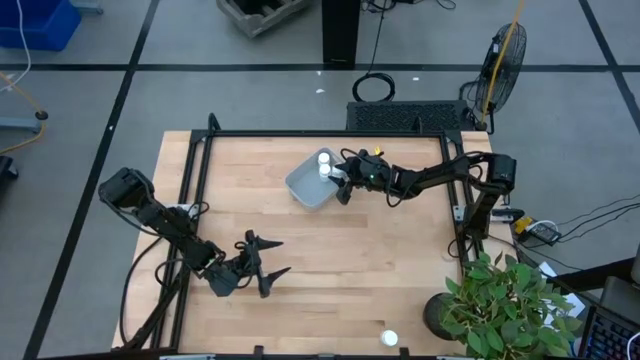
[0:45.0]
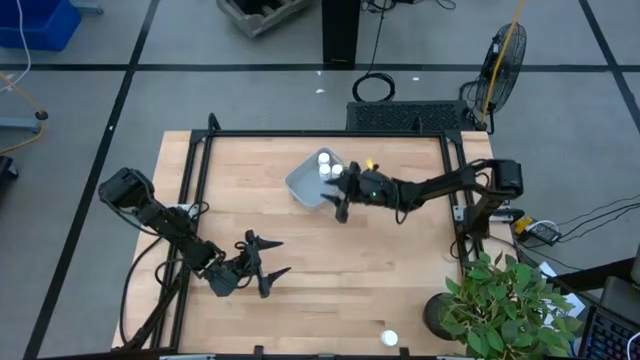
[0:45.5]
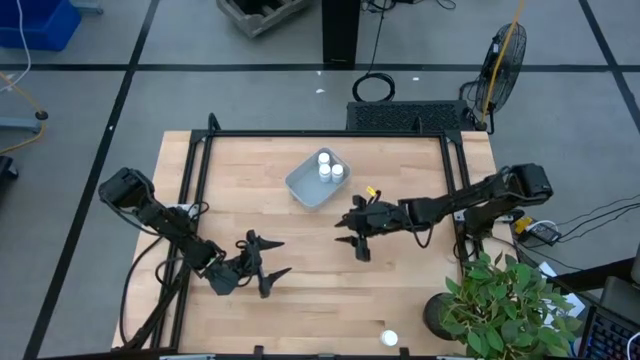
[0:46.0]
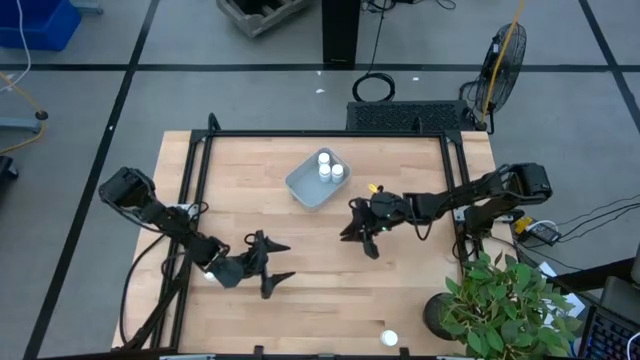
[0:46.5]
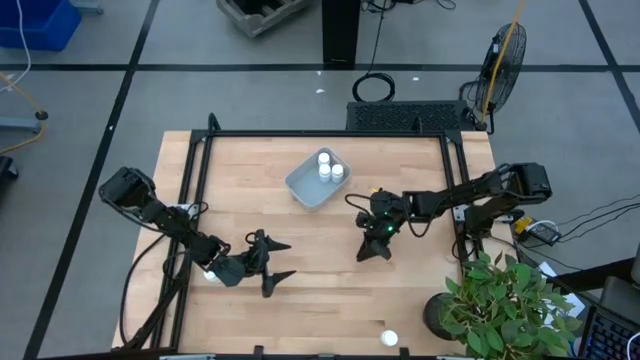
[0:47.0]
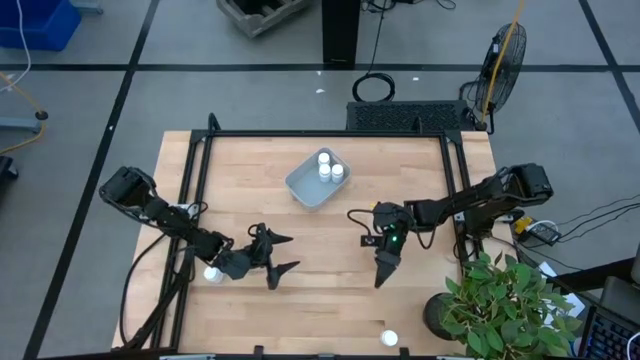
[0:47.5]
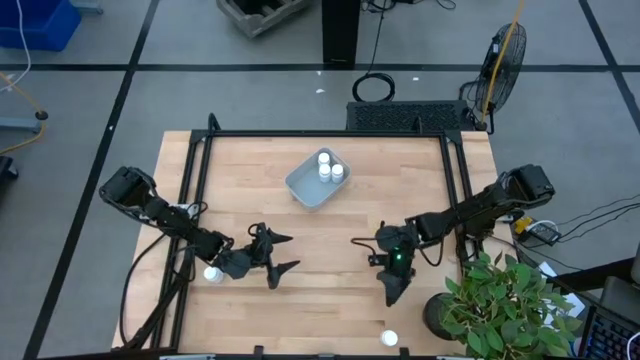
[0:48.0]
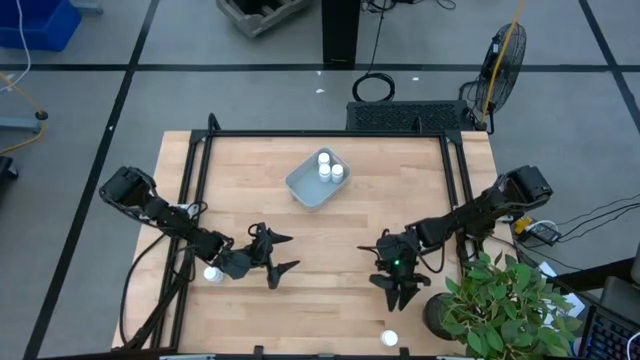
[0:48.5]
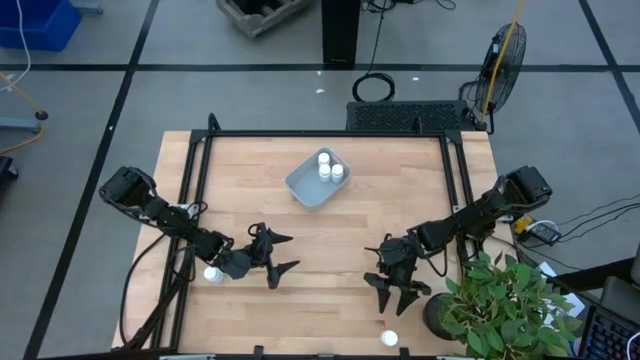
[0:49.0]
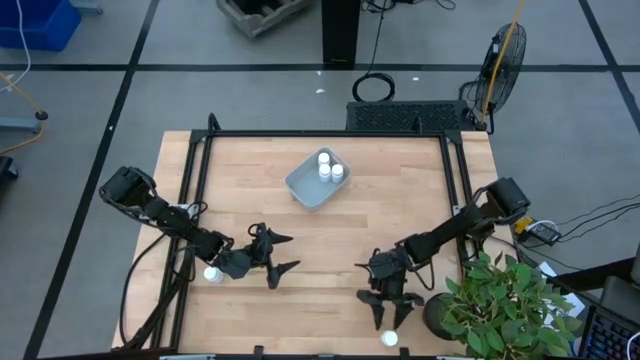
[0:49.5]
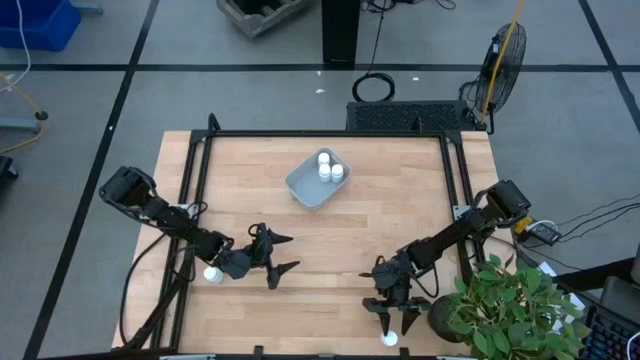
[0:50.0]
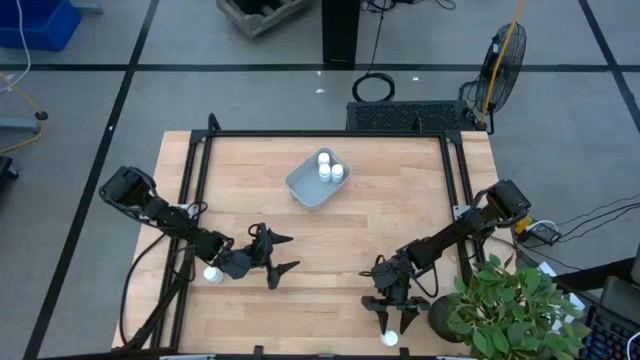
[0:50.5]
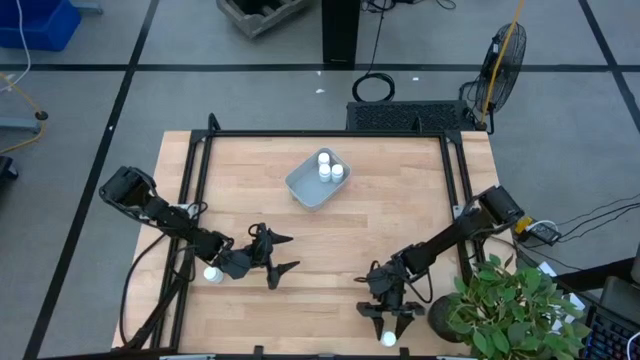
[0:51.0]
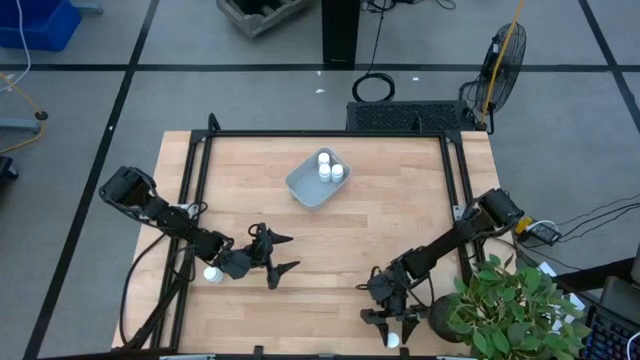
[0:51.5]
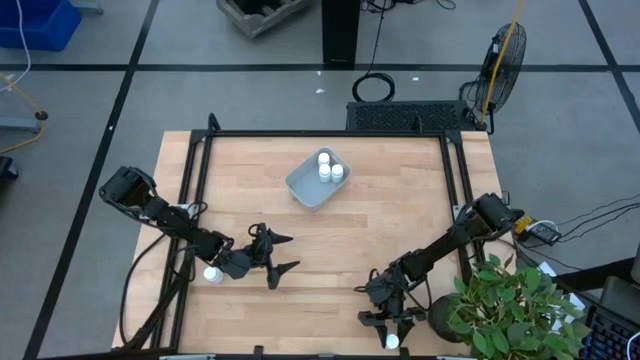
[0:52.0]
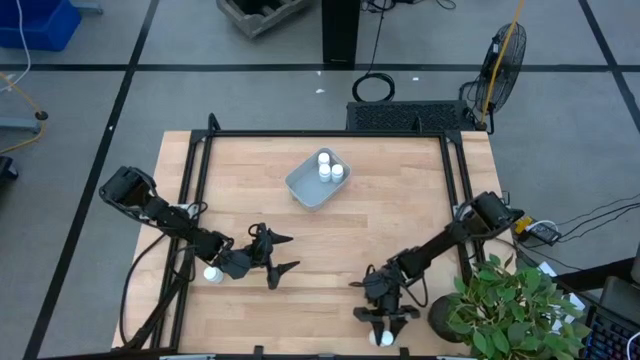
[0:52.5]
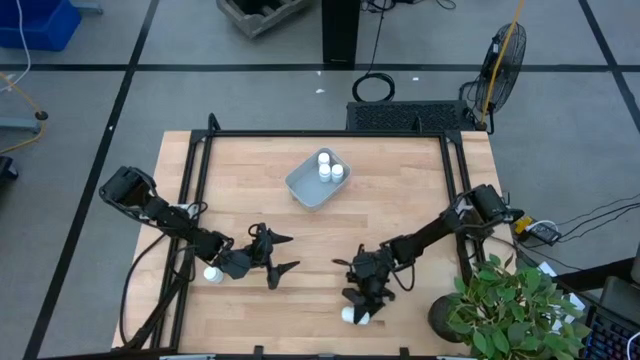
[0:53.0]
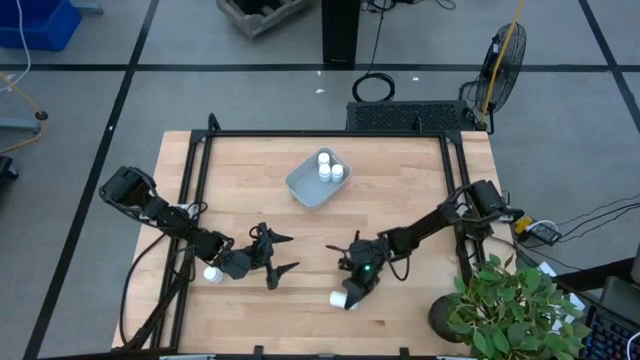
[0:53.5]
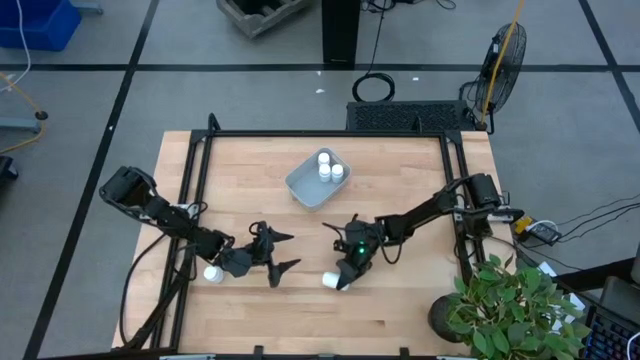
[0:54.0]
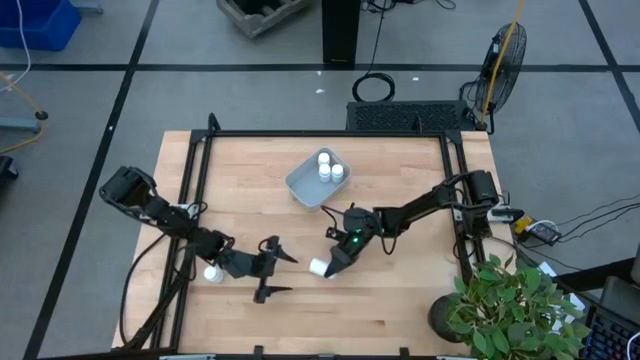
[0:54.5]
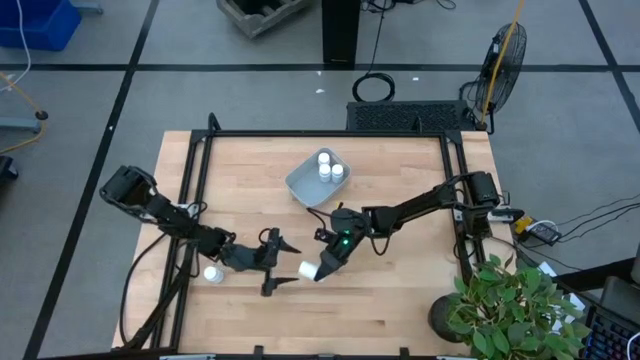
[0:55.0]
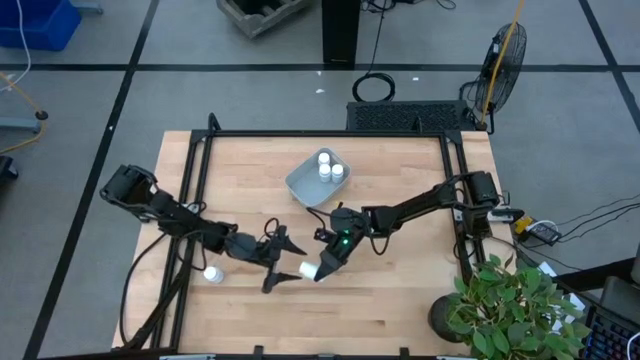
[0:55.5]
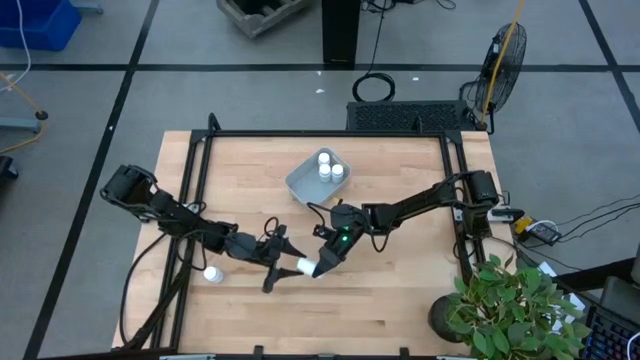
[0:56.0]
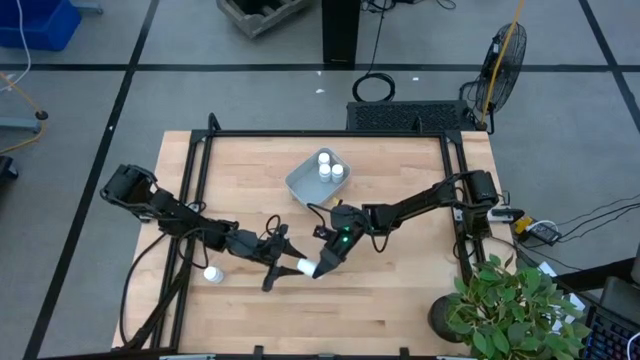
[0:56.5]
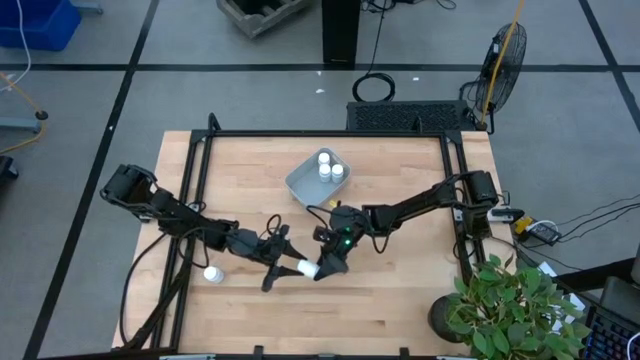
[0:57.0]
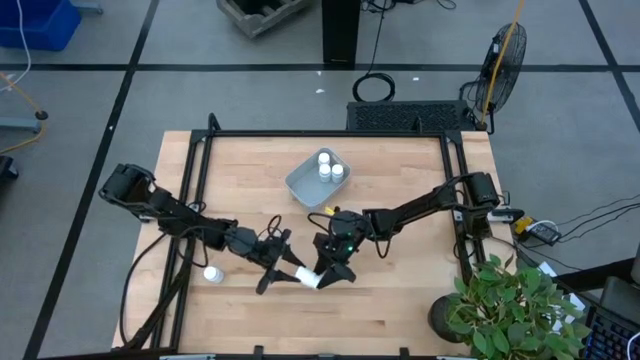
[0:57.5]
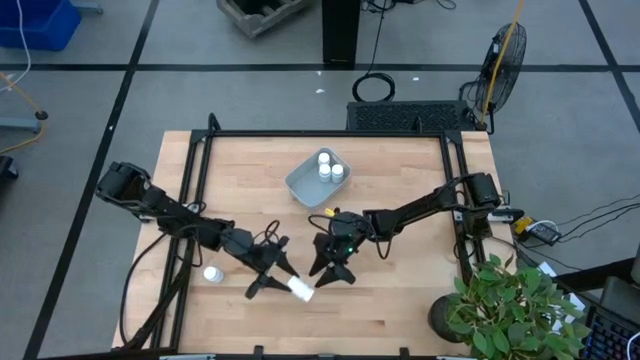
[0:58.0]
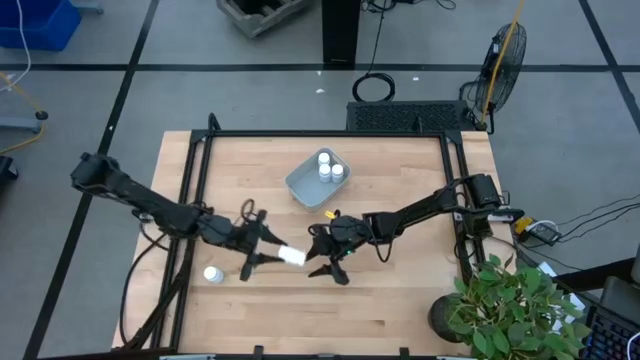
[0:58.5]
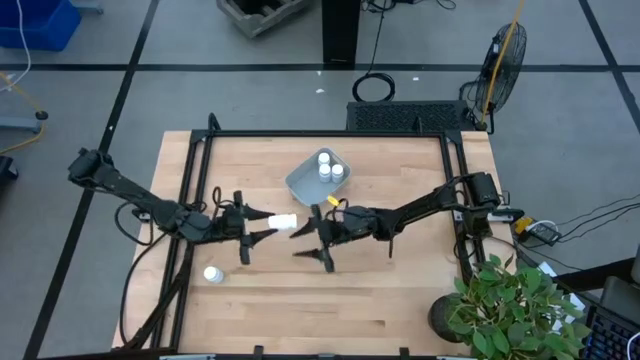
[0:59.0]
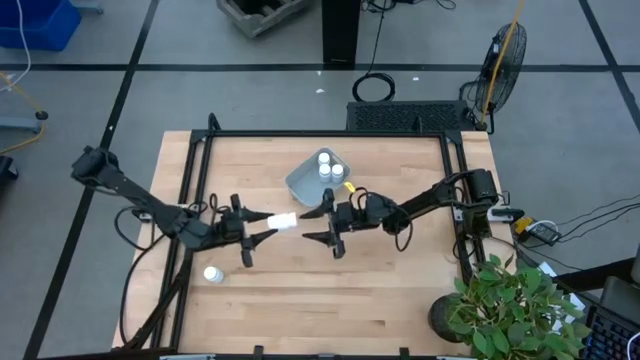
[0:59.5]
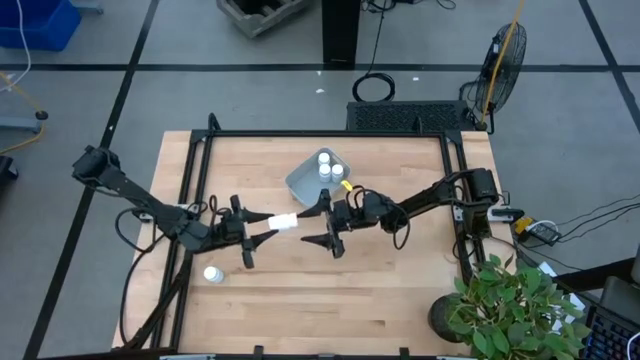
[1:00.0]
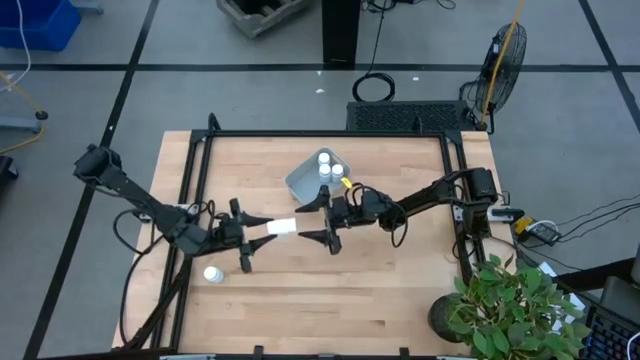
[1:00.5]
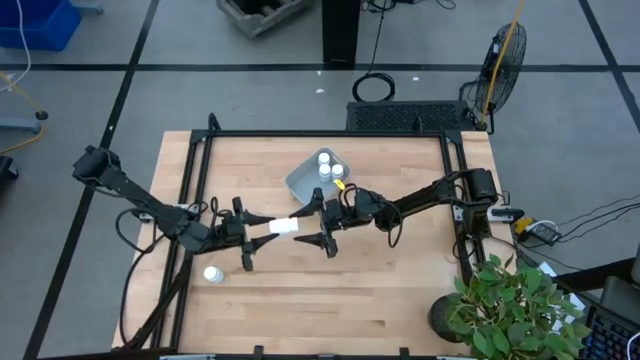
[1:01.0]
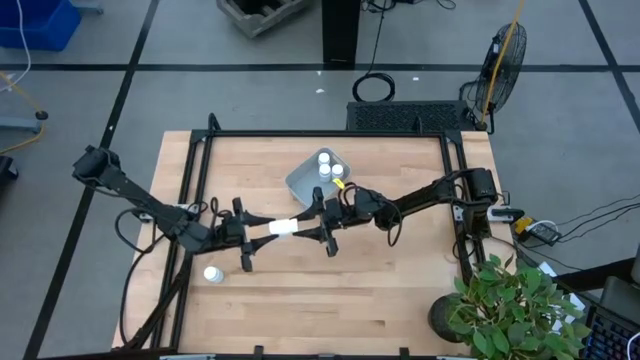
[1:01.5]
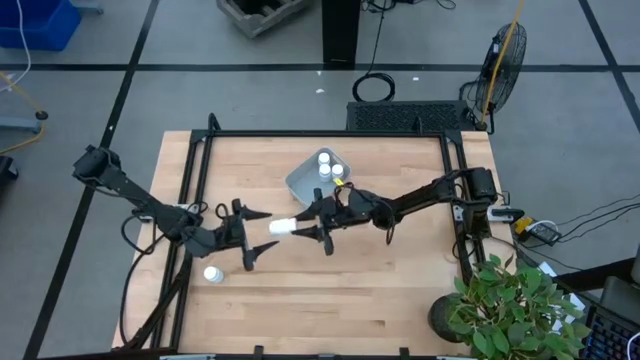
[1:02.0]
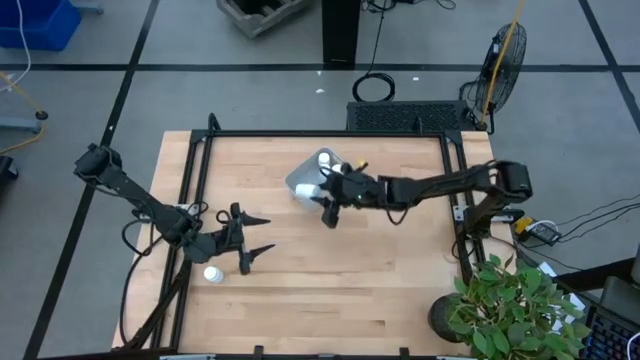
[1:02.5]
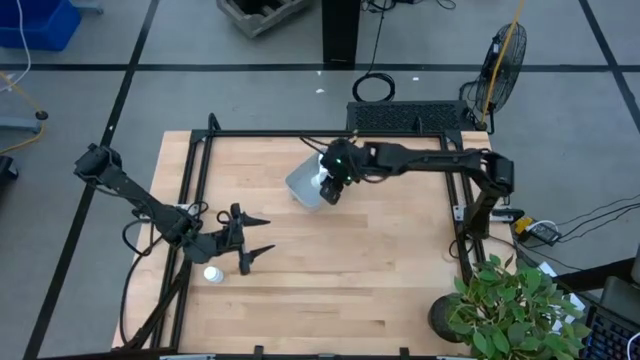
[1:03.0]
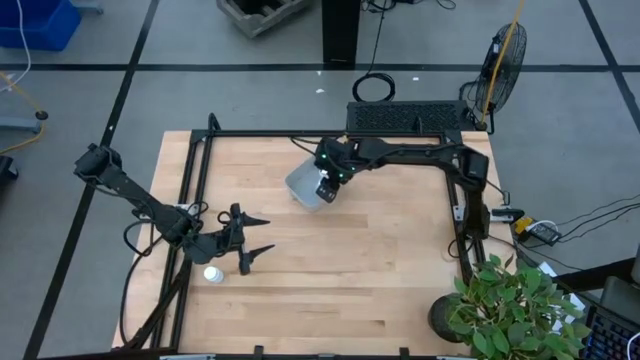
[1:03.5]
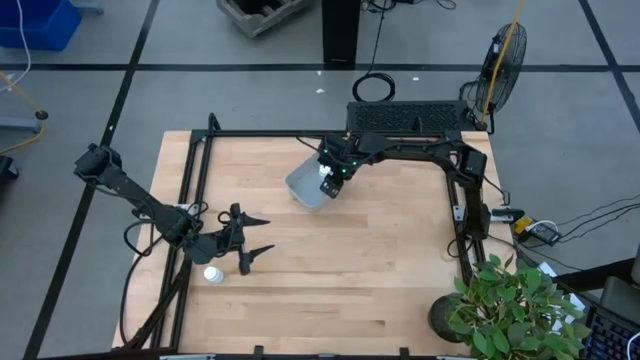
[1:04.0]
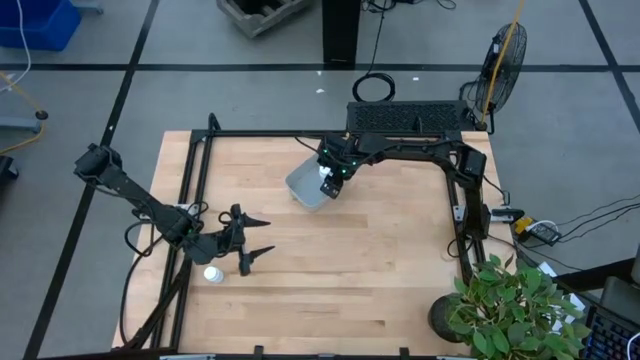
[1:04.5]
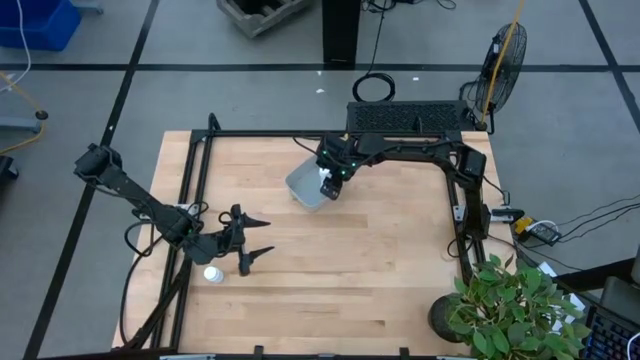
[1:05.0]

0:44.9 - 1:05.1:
Task: Pick and place pill bottles into a basket
Put the right white medicine bottle into the gray bin
